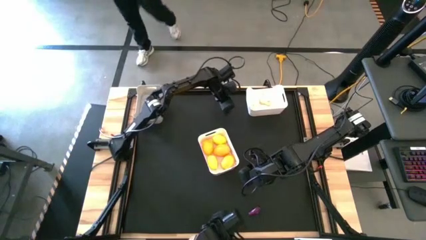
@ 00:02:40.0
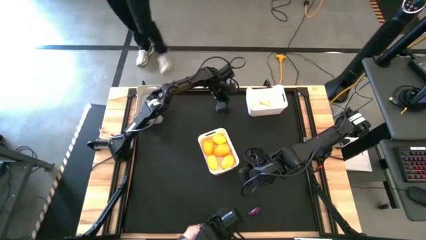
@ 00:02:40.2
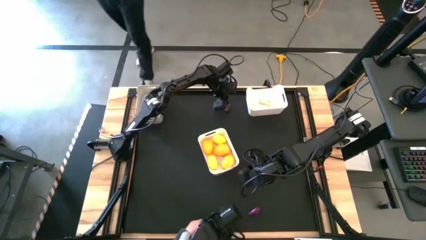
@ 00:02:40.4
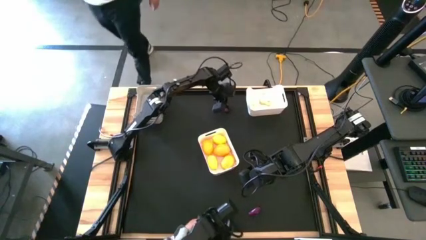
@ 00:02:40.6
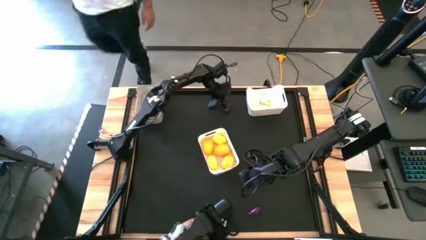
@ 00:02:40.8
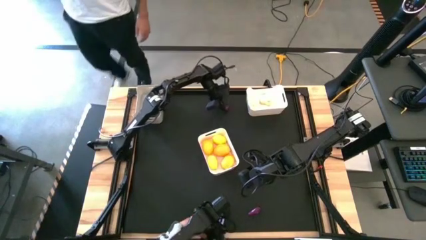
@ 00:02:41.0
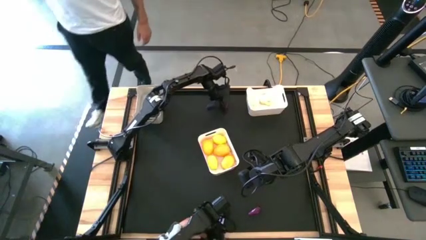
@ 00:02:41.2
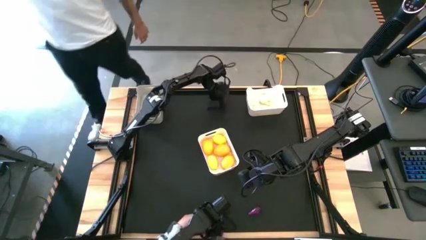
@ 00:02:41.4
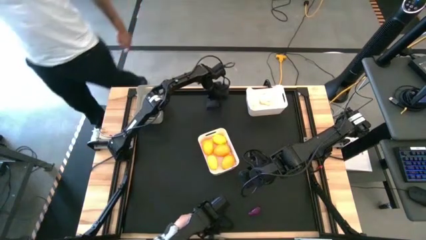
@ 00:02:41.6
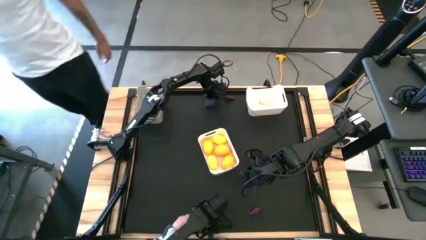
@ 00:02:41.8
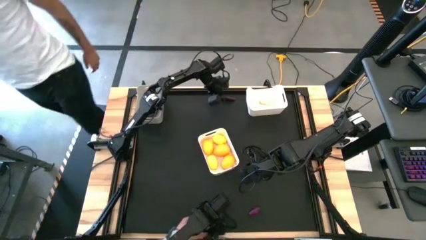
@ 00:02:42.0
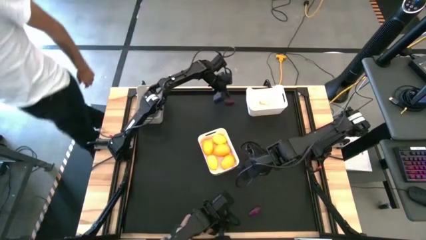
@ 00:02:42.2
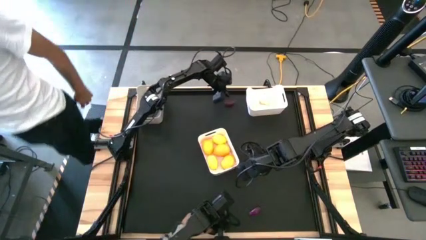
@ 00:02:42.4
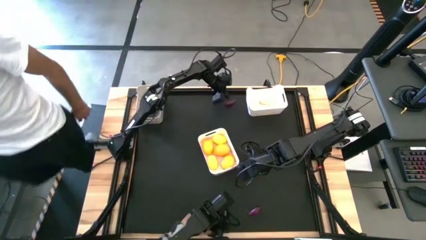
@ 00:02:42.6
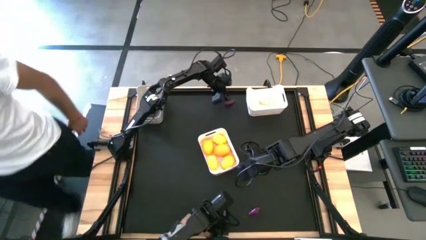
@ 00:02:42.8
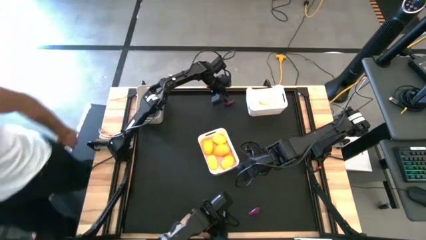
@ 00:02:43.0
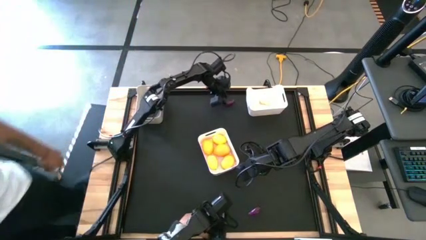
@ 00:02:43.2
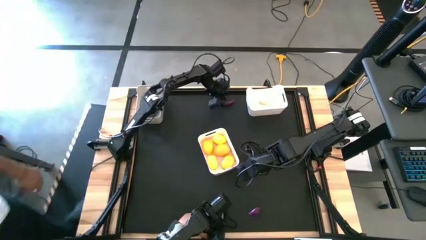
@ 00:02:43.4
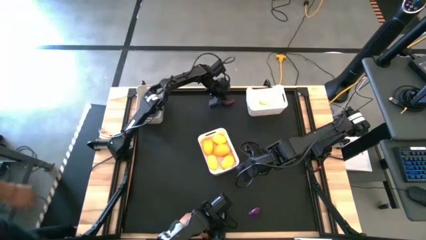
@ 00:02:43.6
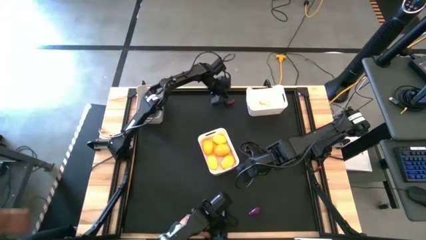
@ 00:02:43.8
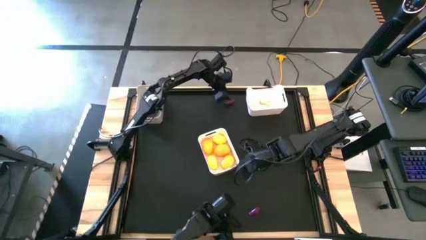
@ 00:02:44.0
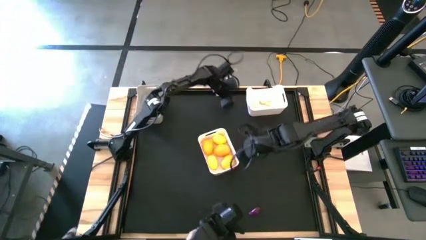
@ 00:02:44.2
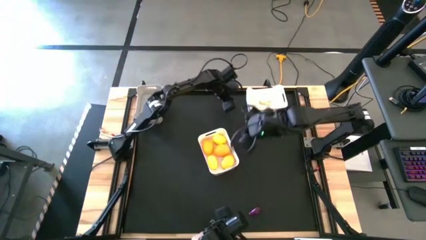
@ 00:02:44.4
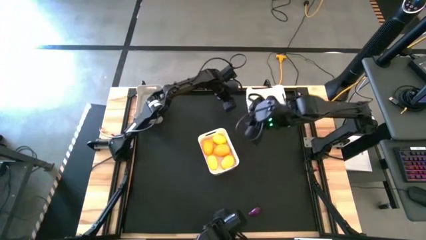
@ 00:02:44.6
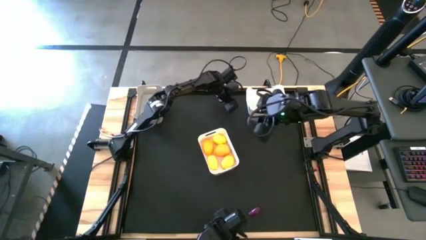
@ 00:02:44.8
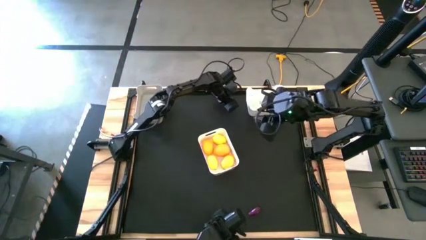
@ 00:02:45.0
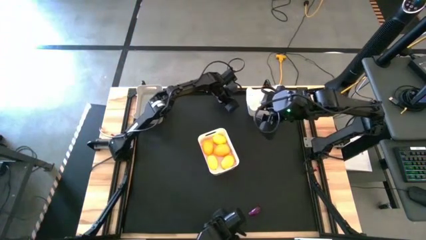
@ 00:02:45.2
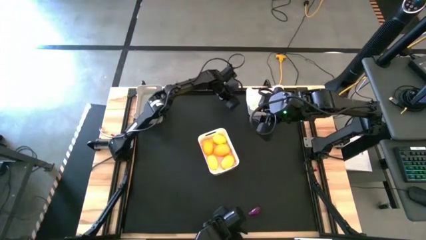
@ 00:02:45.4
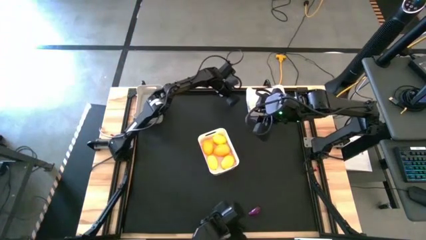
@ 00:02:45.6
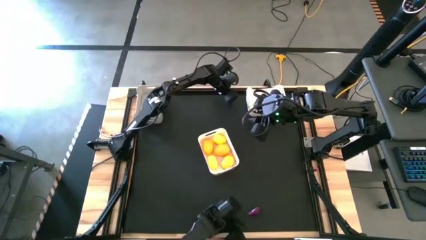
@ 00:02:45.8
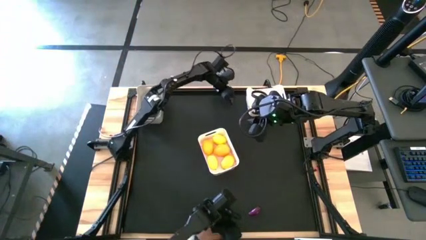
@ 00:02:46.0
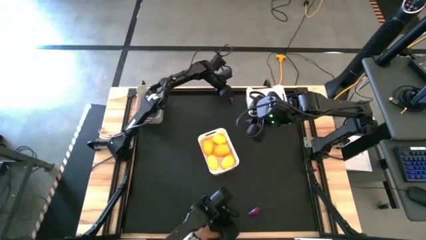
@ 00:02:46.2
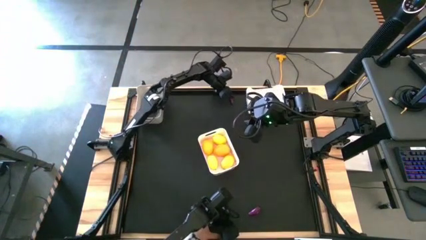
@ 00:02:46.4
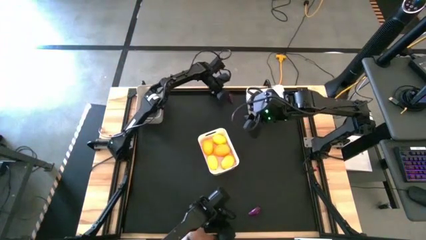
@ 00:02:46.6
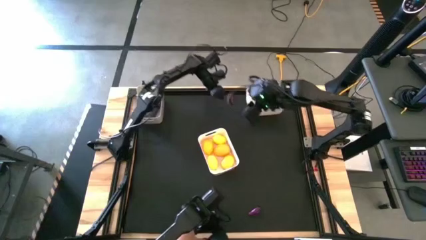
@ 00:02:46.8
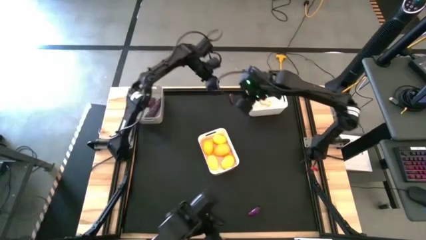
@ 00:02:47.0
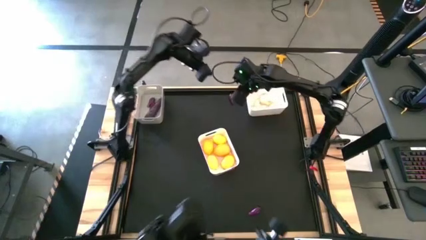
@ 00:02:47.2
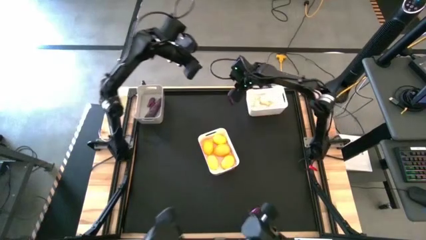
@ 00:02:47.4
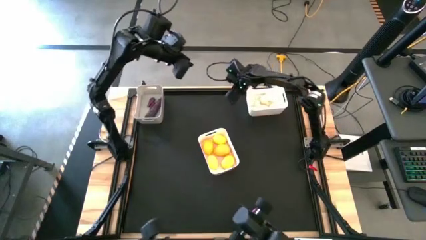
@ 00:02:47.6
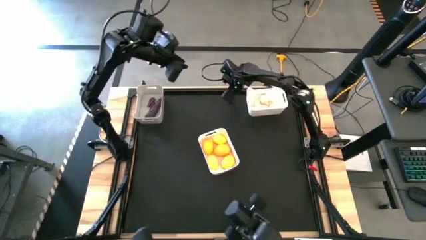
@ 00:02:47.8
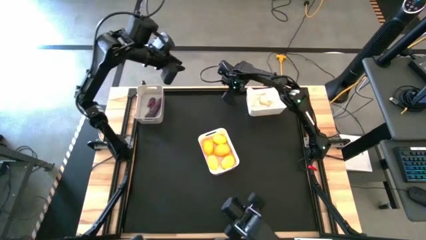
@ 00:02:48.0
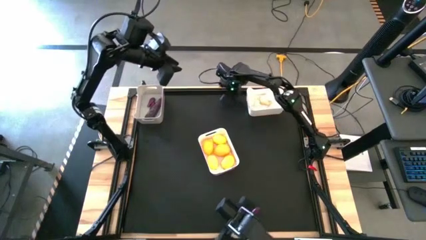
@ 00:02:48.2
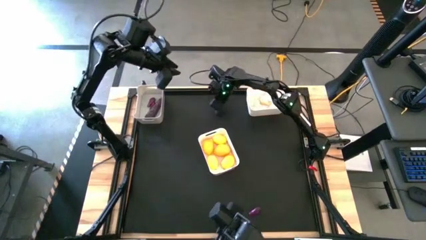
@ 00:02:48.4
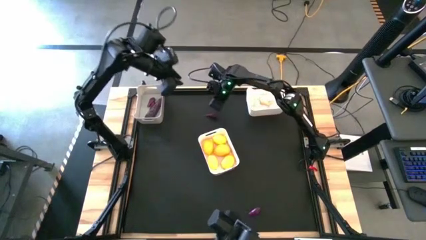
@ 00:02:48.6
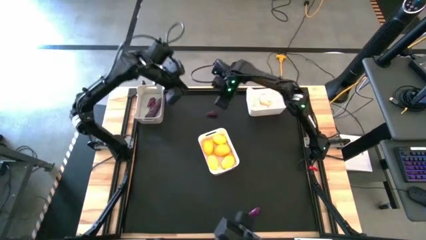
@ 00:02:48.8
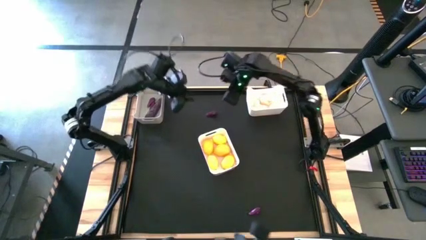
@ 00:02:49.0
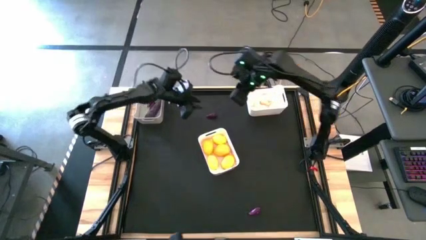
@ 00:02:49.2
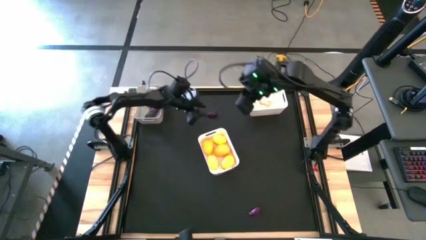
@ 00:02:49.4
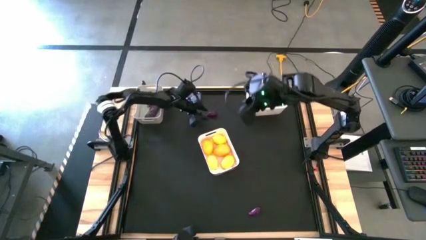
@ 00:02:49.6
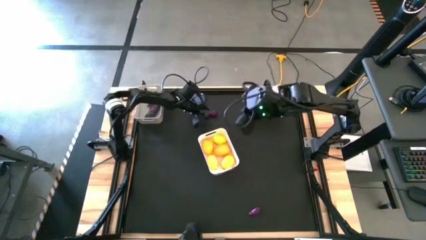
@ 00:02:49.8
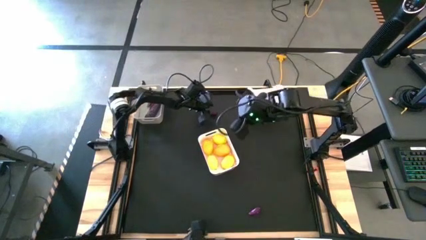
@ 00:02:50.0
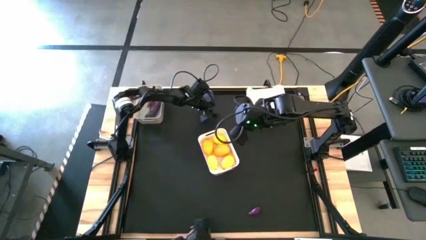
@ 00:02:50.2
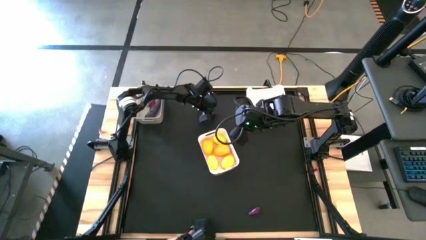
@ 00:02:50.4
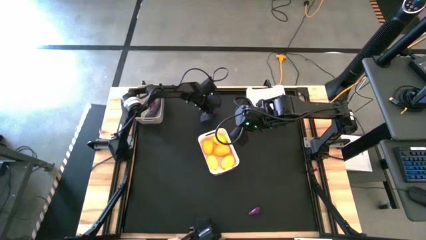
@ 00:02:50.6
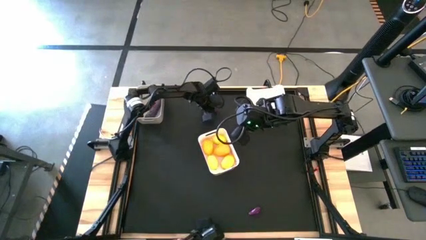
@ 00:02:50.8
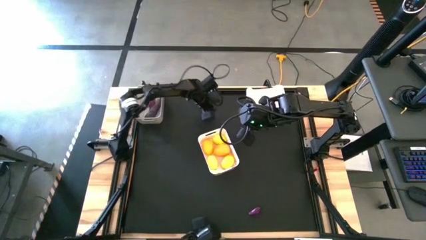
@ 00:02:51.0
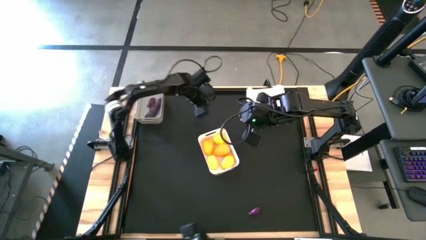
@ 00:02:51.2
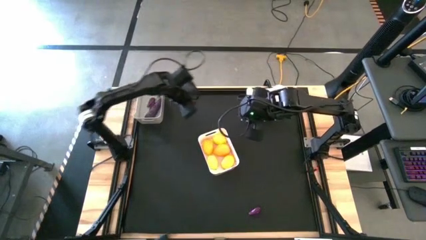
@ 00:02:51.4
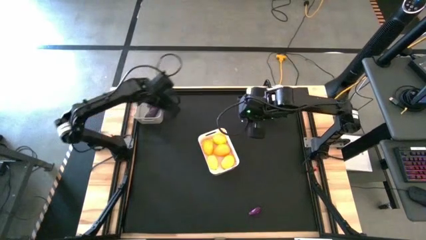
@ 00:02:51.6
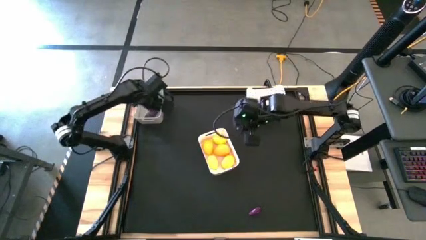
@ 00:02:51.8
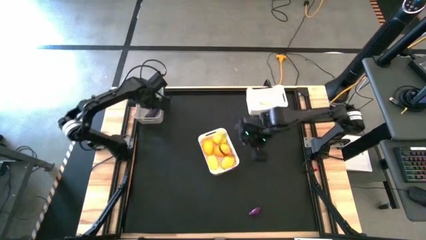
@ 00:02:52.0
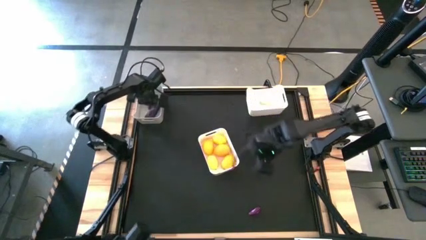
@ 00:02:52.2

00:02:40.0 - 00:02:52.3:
Task: Sort produce into baskets
Put the eggplant into the gray bin

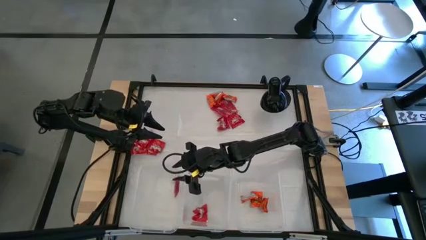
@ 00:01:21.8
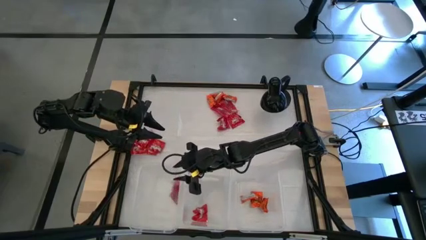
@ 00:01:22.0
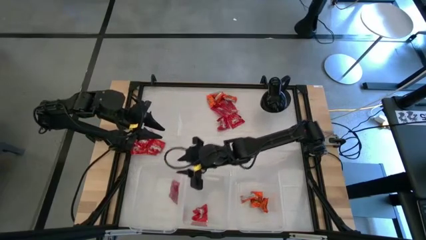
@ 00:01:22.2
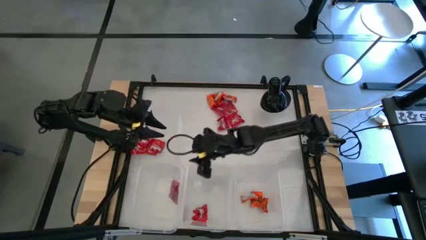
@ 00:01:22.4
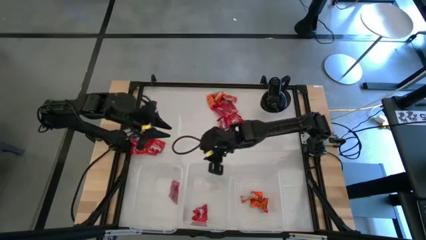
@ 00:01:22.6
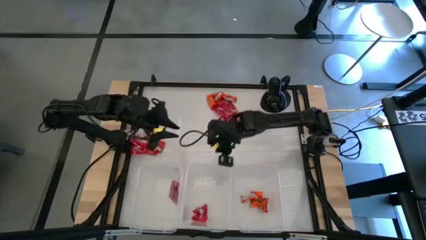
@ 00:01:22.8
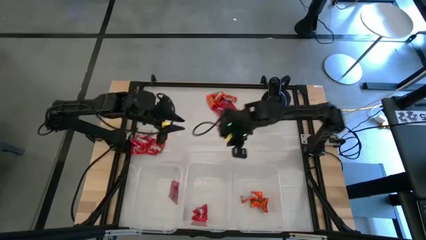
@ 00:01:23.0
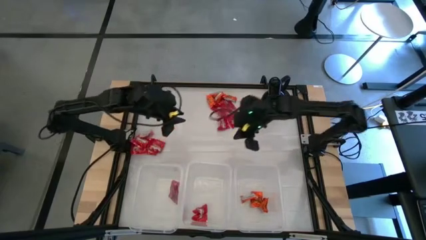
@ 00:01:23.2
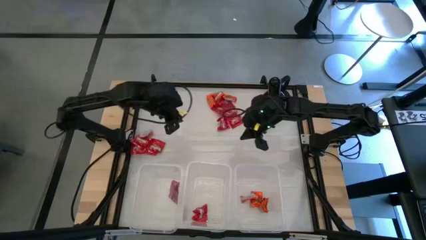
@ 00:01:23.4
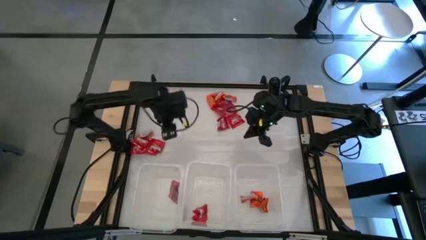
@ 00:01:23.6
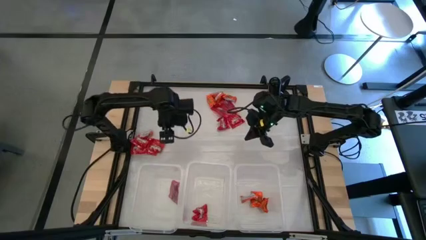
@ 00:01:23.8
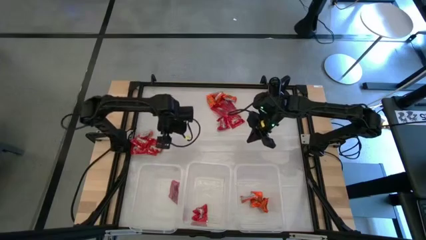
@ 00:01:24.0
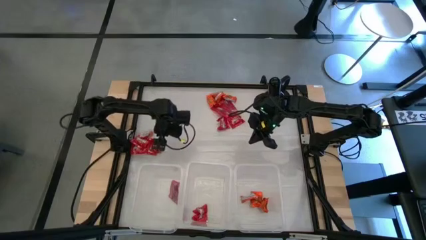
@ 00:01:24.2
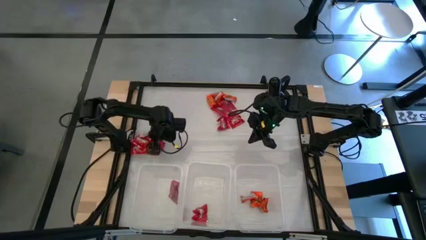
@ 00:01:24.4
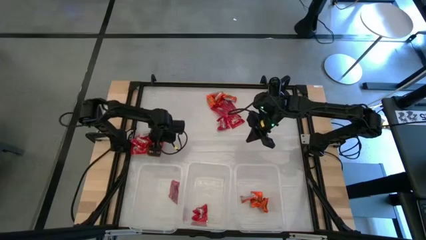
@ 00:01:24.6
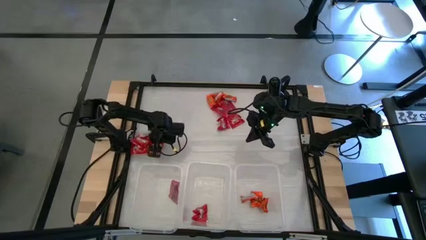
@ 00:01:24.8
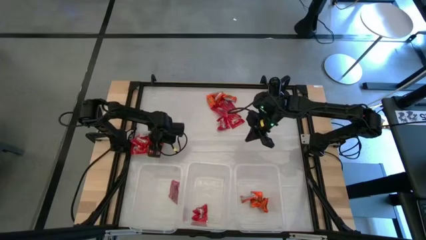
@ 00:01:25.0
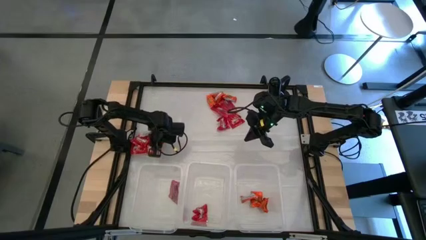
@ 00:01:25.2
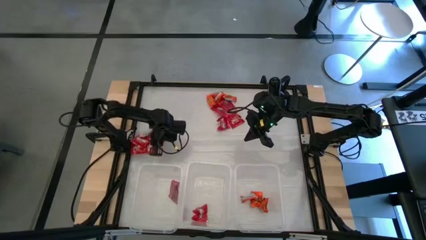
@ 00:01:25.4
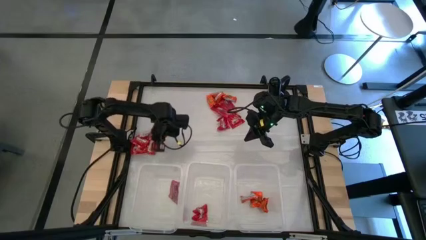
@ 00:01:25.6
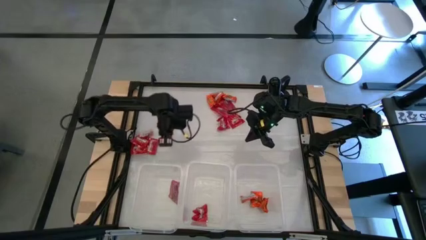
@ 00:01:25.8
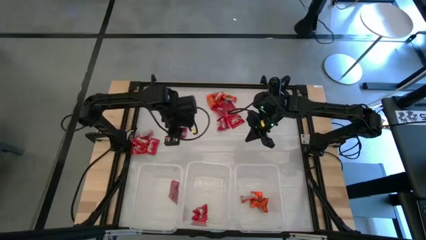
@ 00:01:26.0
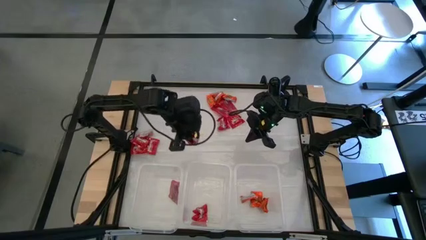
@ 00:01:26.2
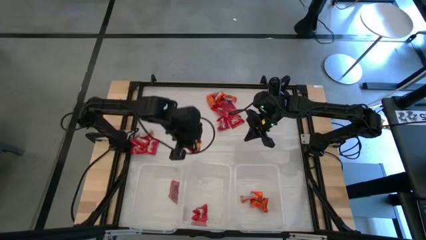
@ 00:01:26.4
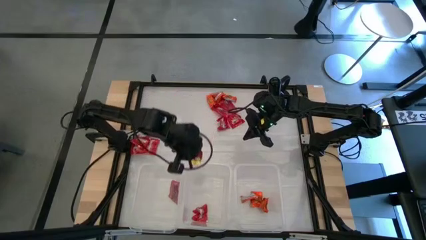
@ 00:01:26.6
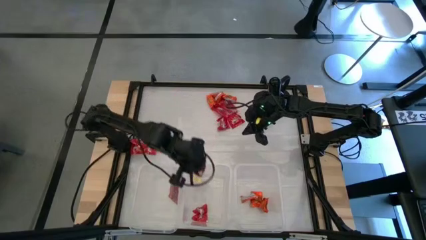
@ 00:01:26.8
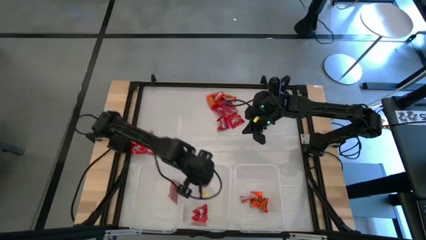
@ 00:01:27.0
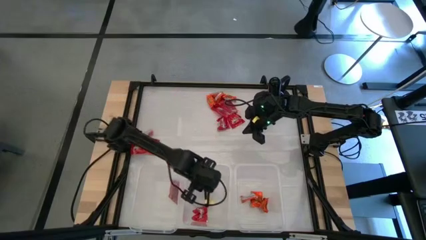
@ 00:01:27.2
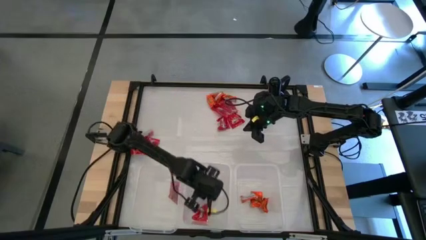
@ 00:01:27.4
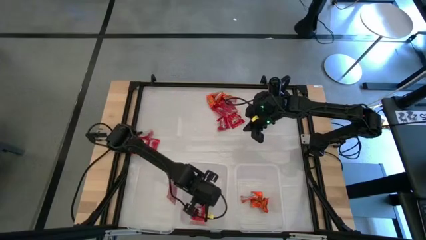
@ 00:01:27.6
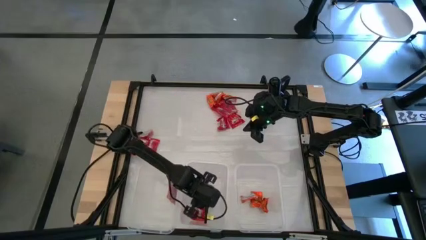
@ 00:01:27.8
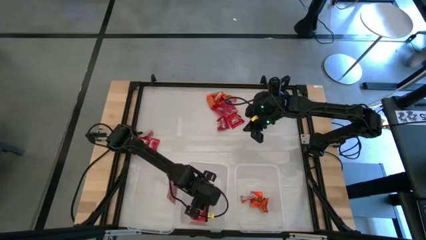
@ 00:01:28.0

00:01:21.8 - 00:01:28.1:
Task: Sort candy
Put the red candy into the middle transparent bin
